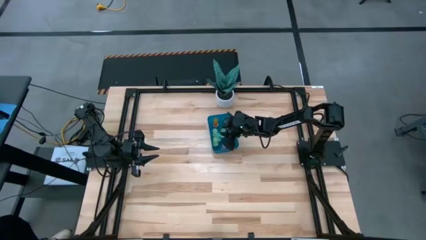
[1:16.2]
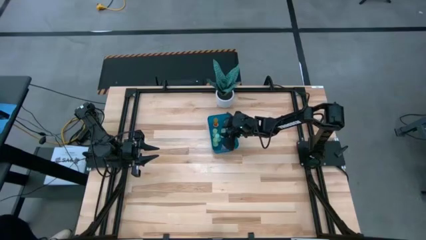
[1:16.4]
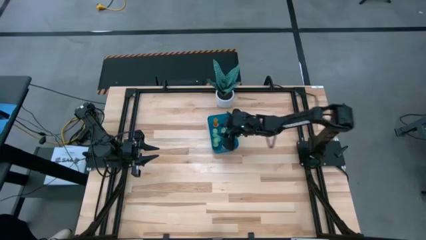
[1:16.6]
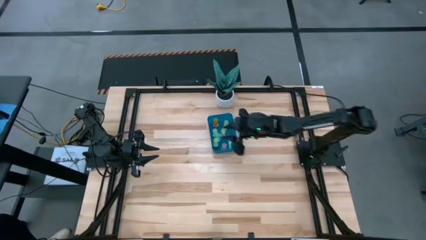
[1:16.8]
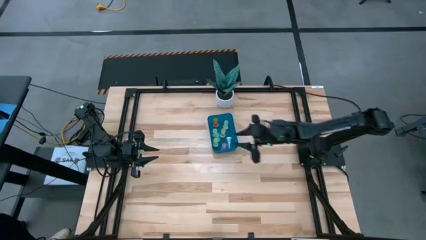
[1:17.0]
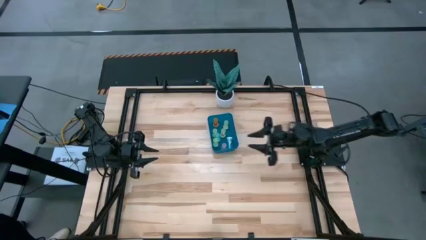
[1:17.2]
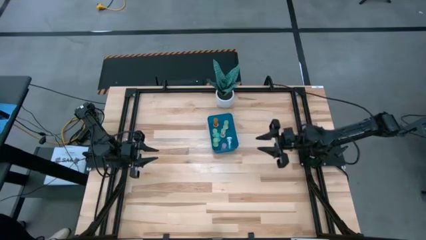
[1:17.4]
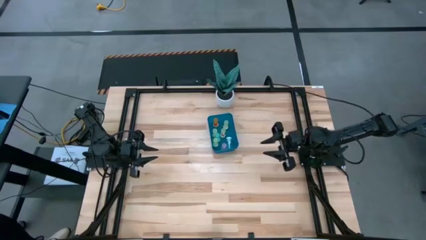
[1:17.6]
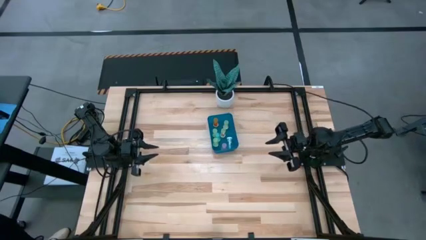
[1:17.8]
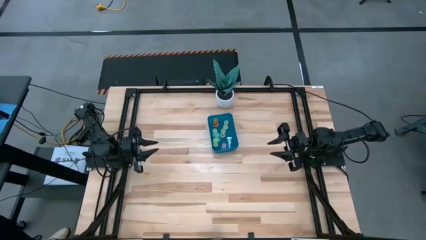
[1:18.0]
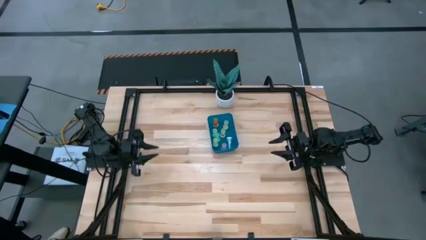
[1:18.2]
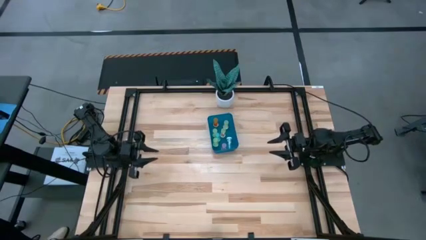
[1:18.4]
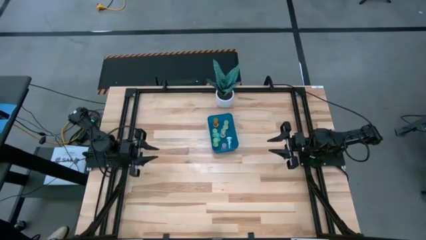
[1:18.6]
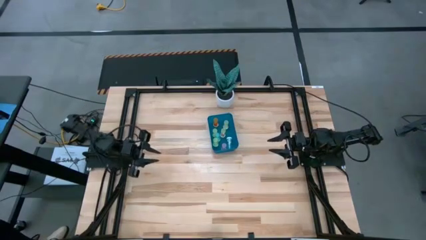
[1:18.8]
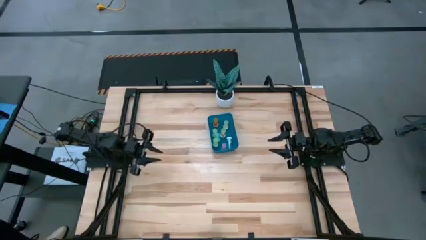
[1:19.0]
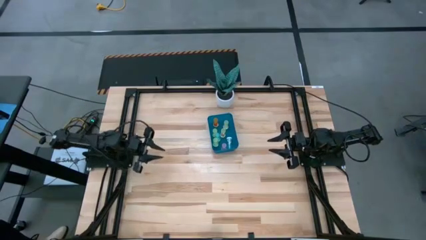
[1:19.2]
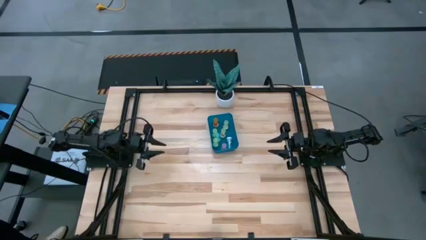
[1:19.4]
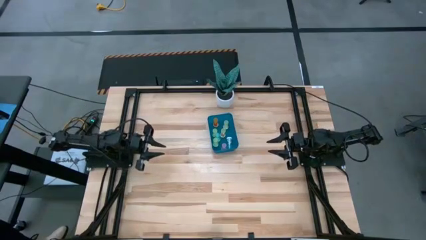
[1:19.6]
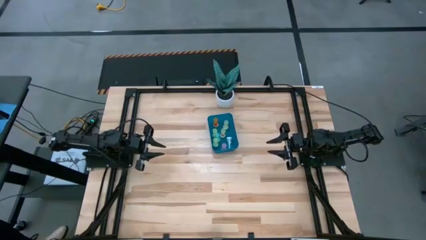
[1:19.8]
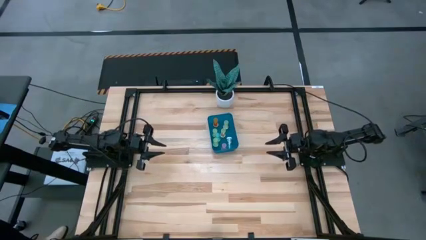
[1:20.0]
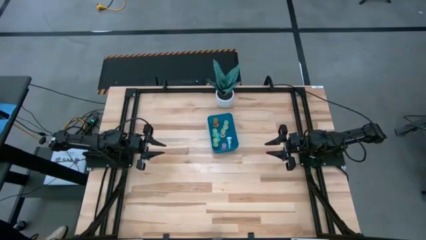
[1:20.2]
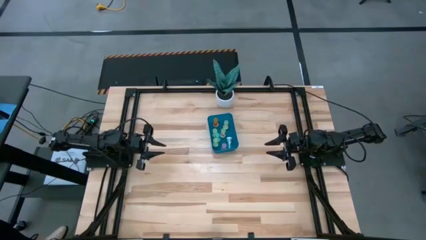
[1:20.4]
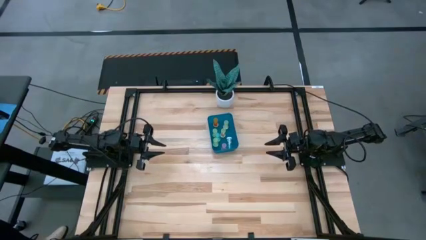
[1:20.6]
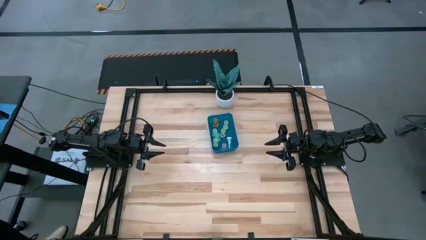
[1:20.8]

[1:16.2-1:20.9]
Task: Pick and place pill bottles into a basket
Return to Home Position

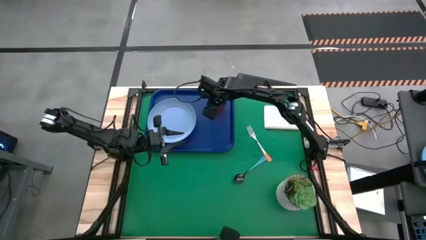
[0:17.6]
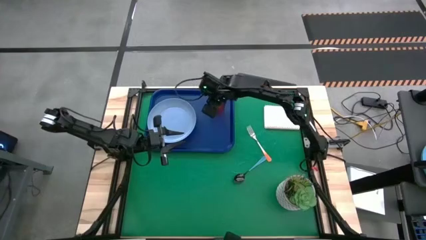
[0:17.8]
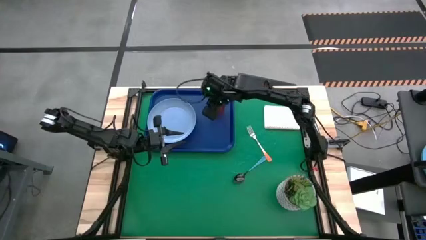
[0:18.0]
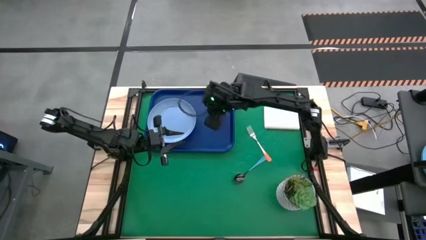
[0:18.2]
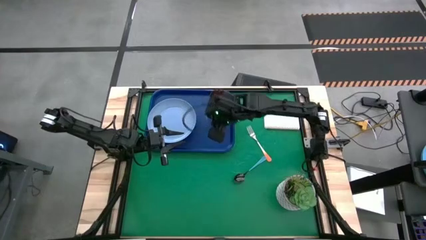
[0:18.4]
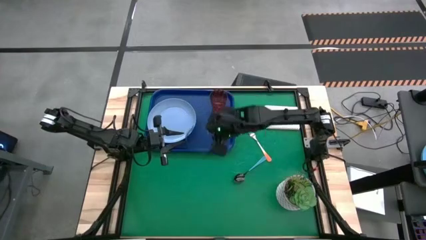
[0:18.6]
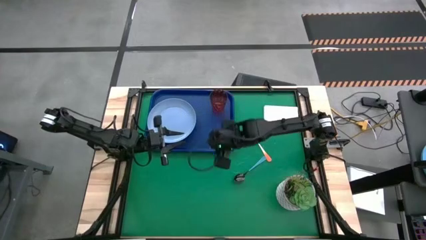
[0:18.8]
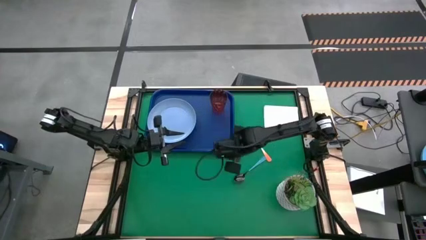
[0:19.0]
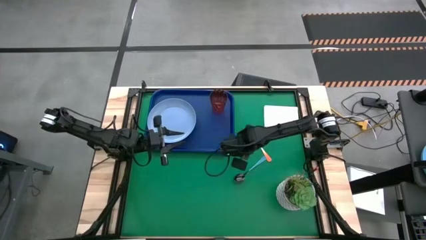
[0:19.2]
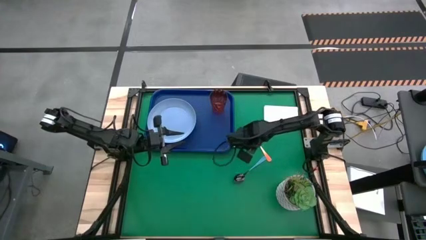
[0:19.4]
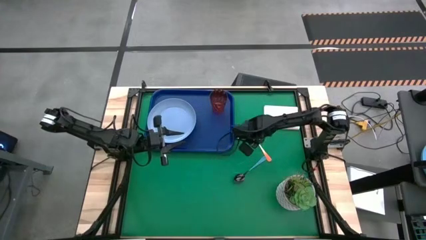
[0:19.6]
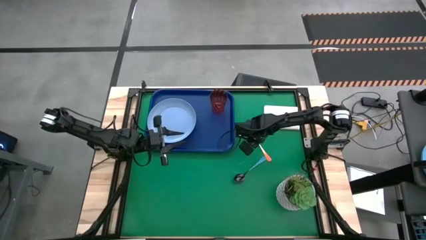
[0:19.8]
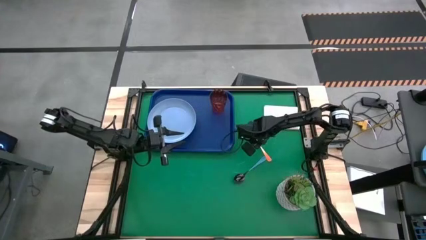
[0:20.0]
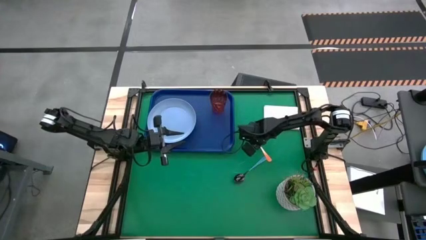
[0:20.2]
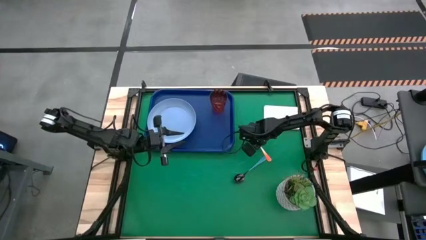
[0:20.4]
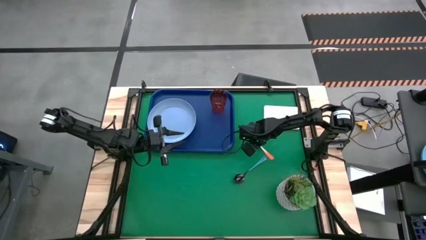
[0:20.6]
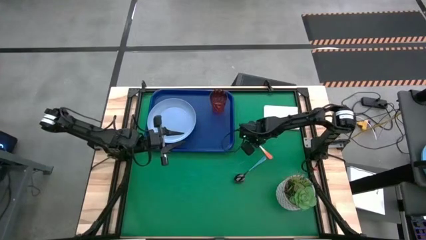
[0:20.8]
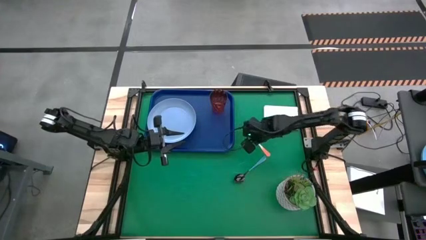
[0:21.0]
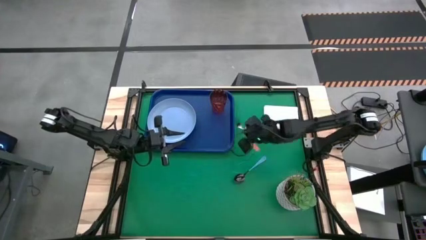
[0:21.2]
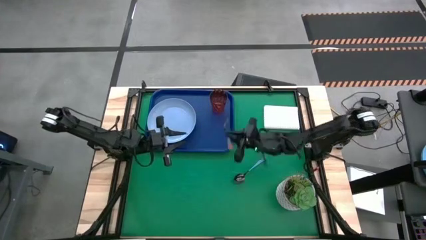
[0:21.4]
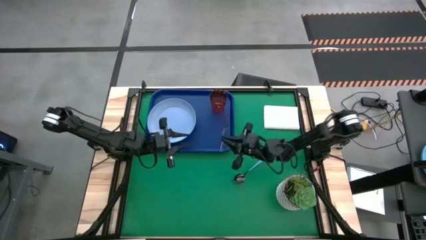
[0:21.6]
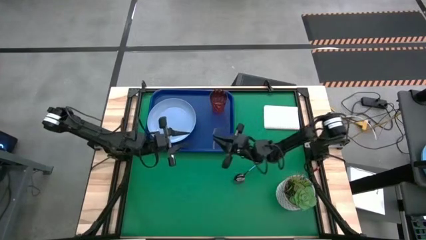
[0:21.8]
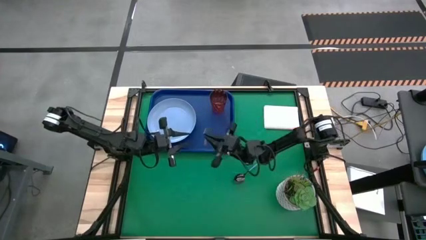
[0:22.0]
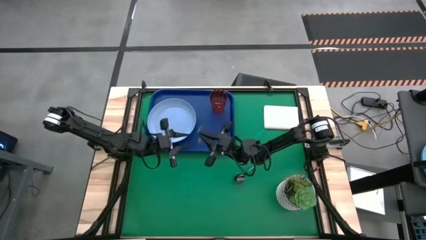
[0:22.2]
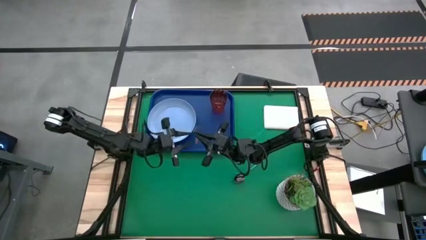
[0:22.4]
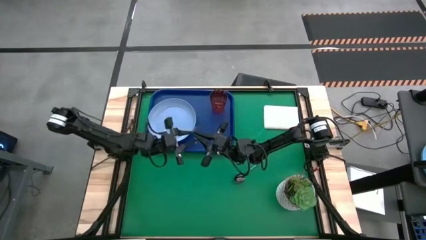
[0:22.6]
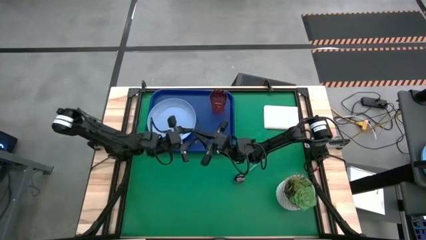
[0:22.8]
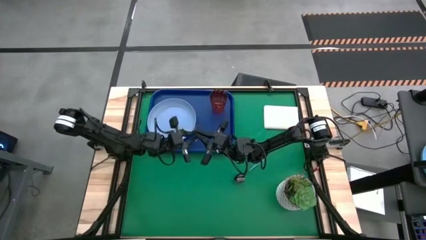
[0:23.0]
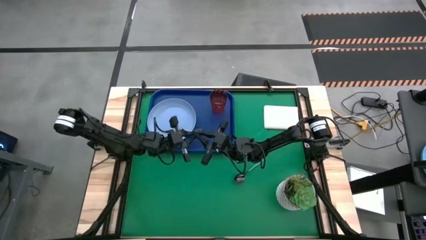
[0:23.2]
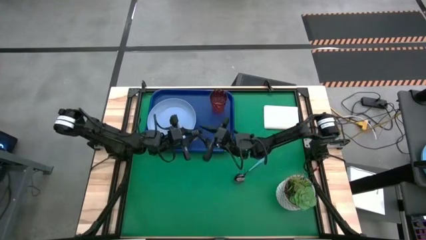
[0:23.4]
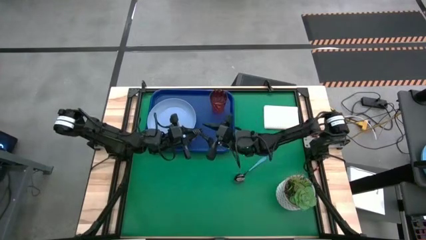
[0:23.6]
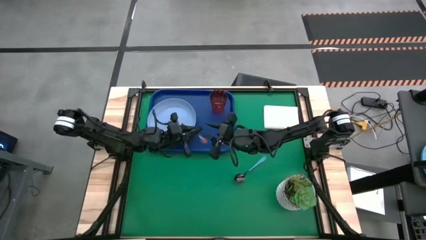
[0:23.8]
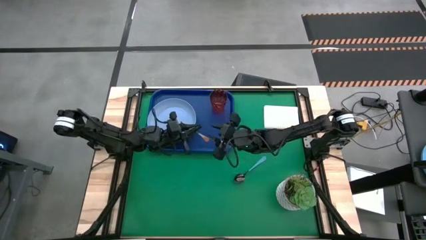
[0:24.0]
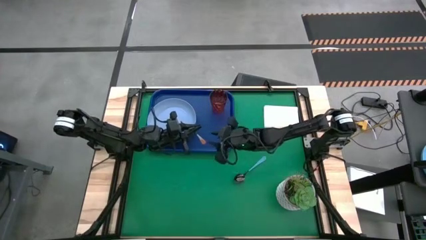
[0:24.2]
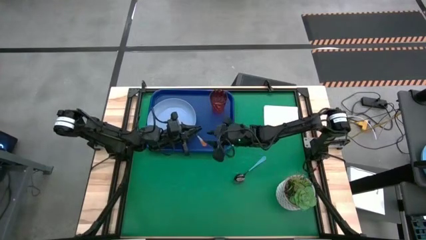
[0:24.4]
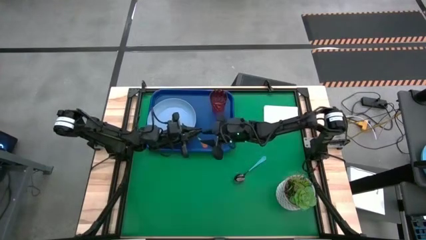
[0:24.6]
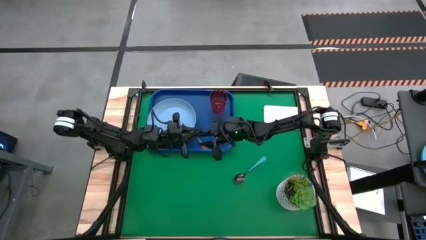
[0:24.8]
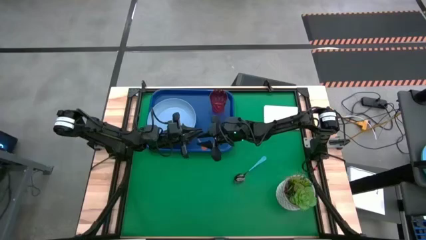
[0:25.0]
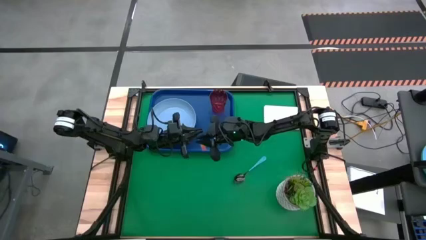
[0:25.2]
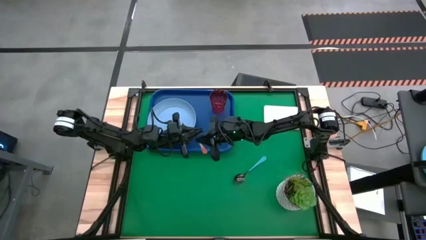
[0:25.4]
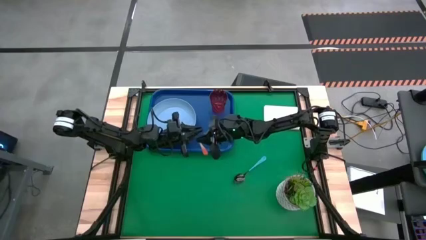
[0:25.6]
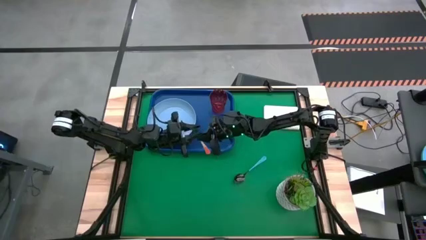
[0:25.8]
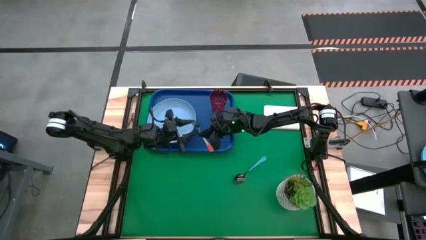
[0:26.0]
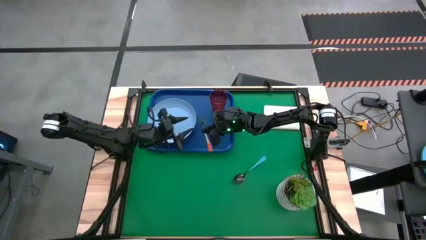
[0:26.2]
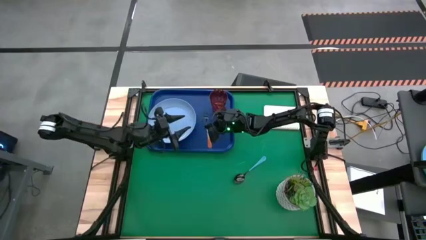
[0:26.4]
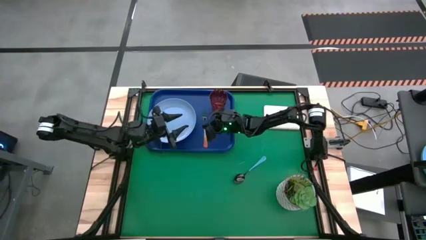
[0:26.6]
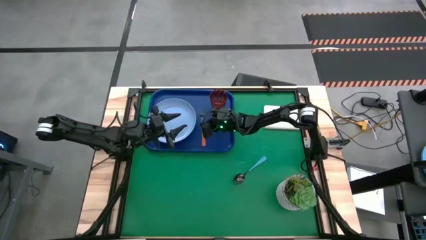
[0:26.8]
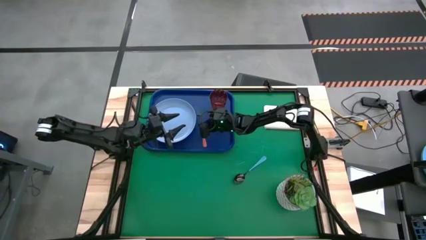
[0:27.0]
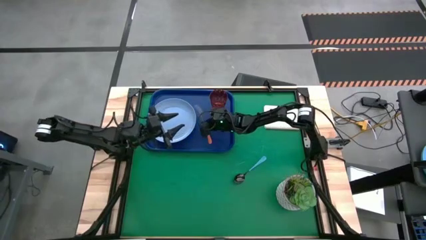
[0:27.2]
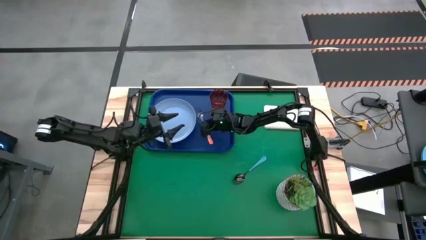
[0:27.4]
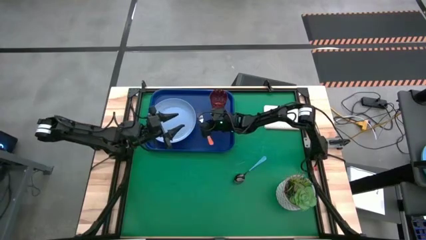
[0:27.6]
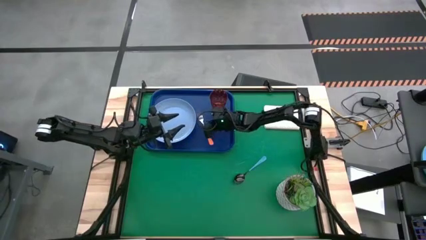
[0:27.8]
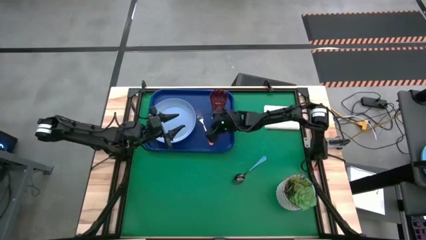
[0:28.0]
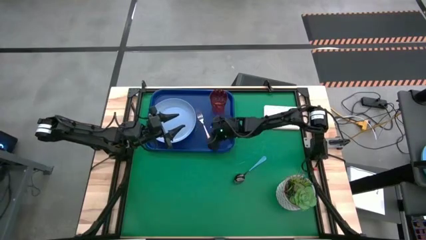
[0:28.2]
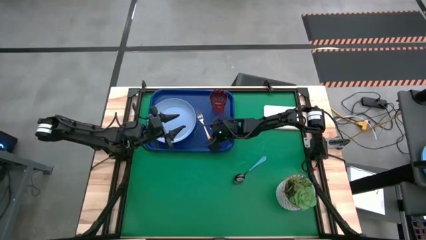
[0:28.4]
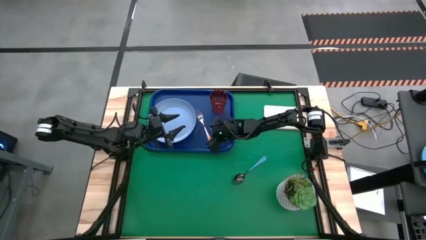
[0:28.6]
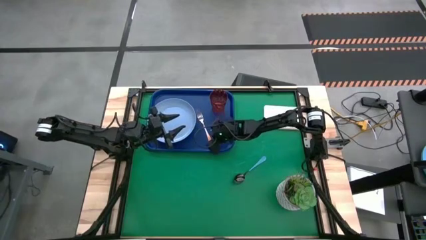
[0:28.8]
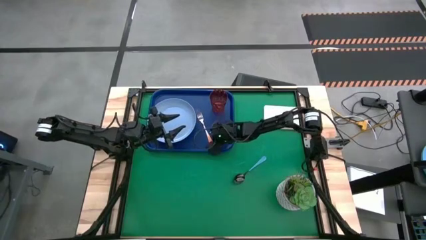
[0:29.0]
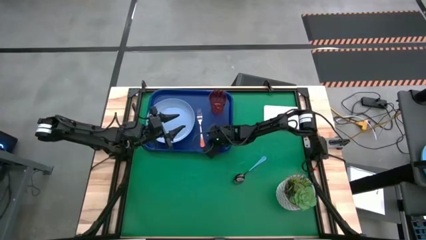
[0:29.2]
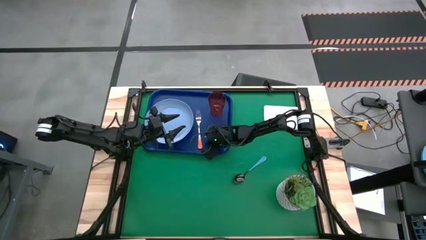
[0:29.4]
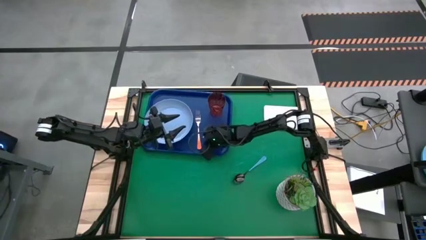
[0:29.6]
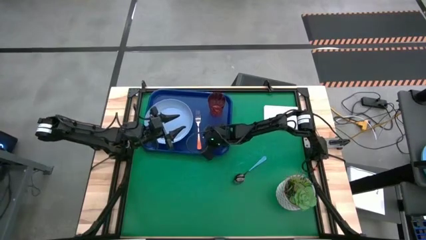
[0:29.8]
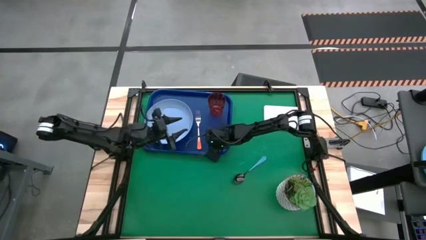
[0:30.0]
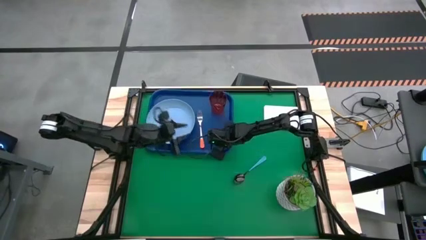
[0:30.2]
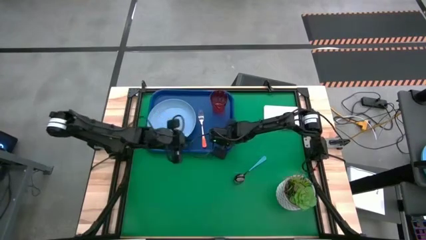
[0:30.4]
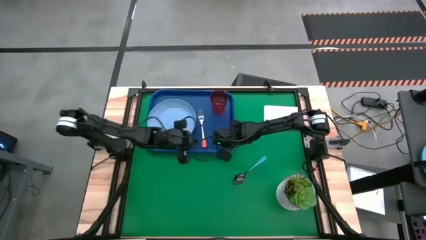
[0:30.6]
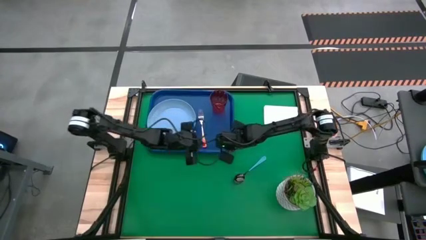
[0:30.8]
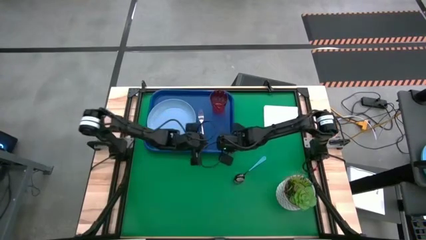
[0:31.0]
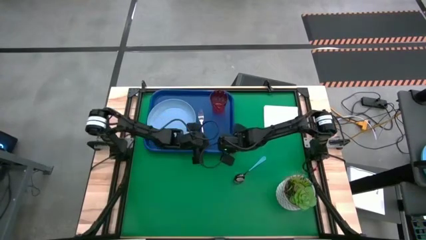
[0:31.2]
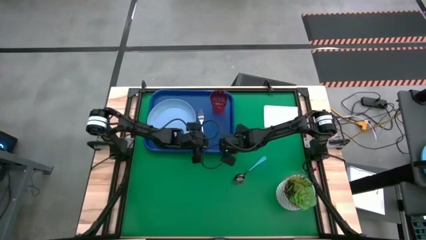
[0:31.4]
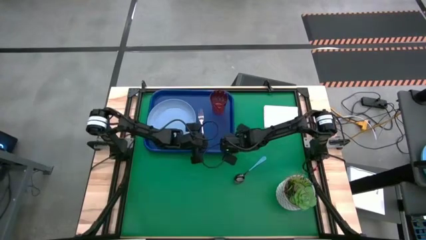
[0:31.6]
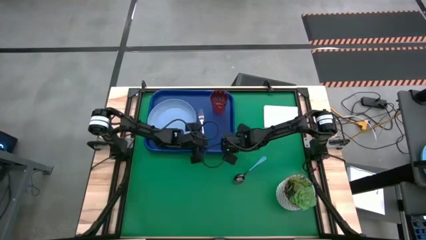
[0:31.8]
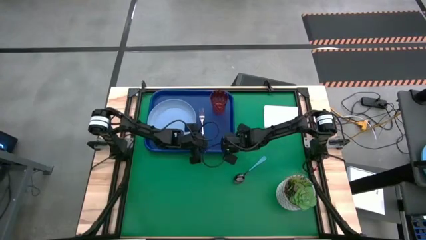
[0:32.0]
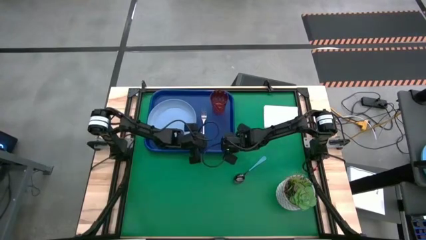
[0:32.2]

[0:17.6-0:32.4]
Task: Pick and place plate/cup/fork/spoon on tray
Put the orange fork on the blue serving tray to the right of the blue plate
